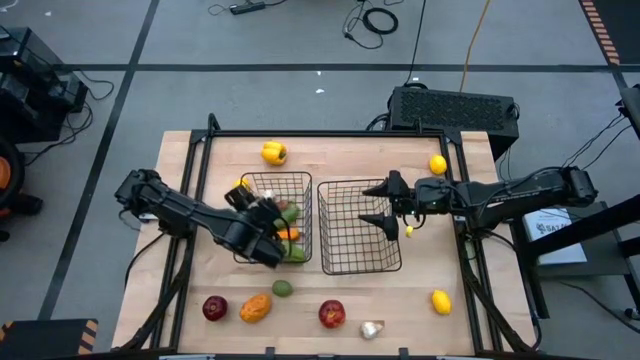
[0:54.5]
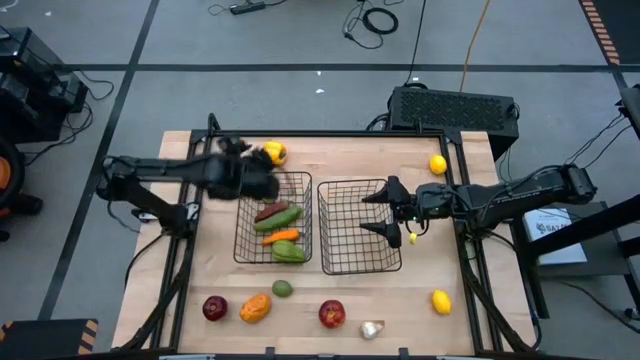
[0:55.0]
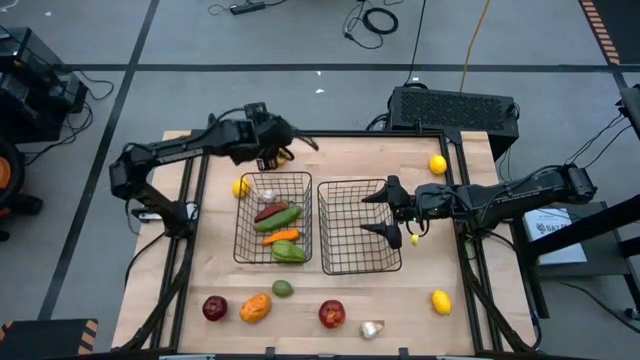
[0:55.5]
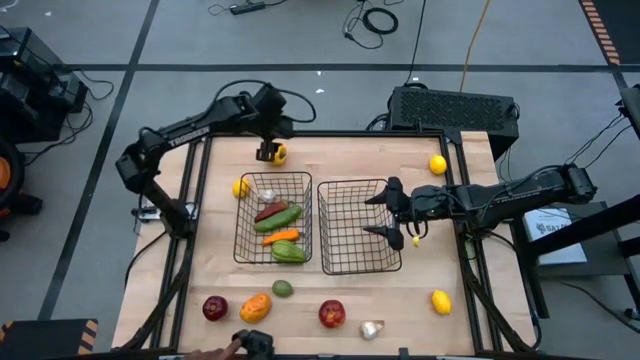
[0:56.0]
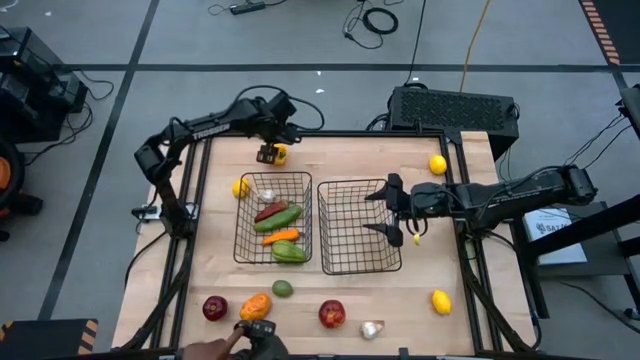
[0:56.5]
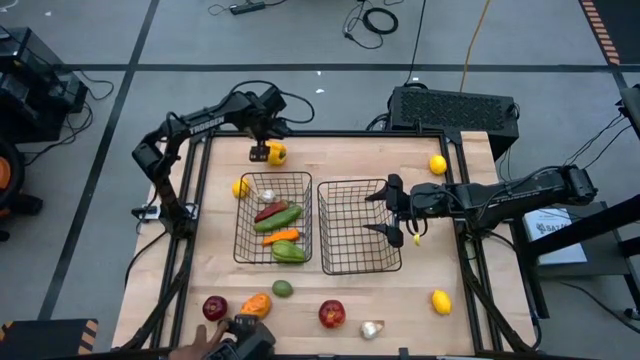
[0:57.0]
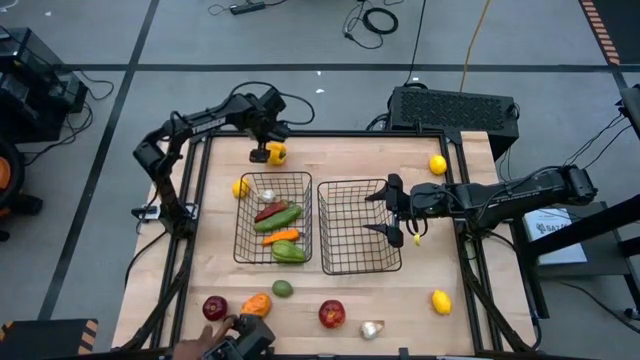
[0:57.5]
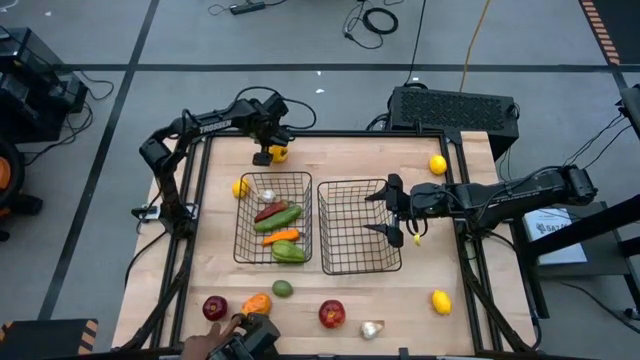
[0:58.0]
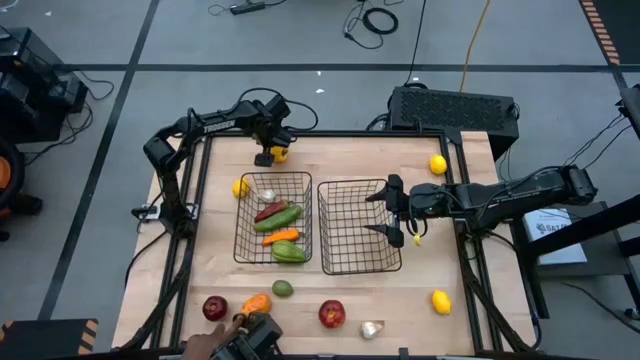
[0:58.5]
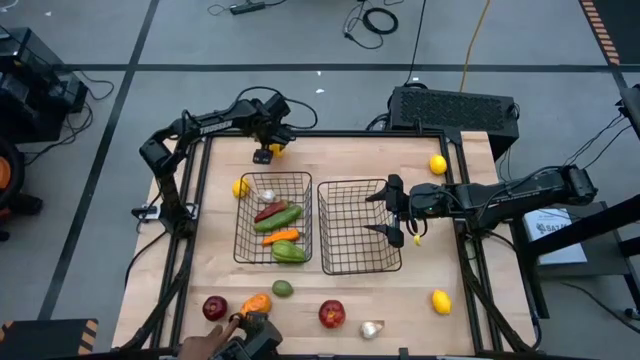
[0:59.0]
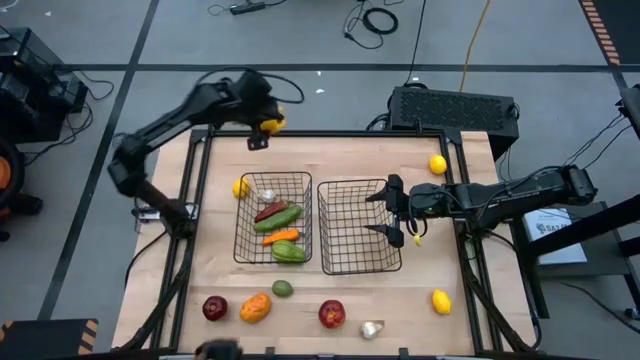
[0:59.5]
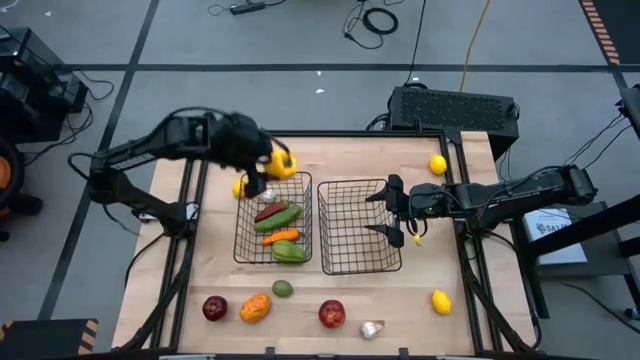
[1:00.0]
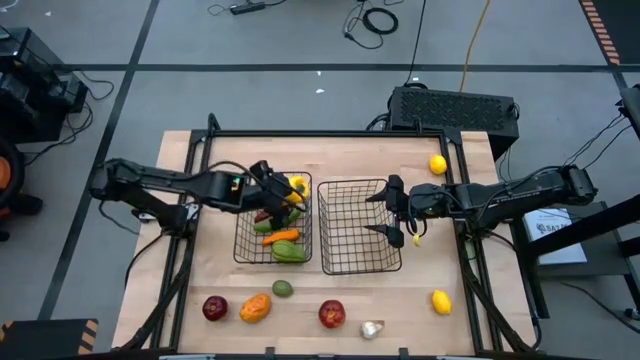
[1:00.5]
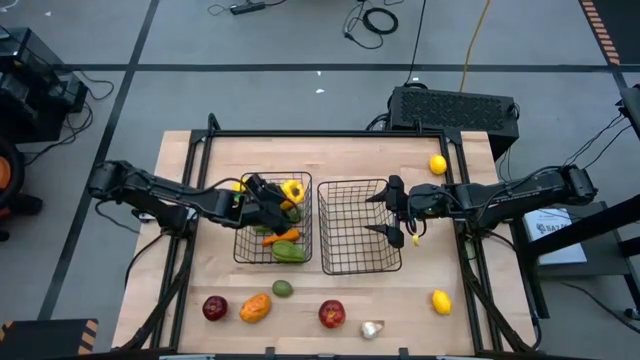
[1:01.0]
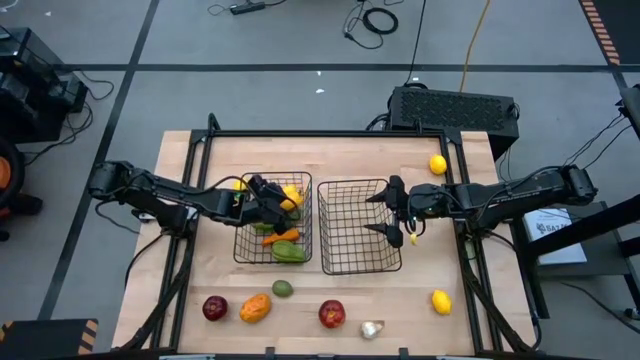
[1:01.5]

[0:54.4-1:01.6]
Task: Sort produce into baskets
Put the yellow bell pepper into the left black wire basket

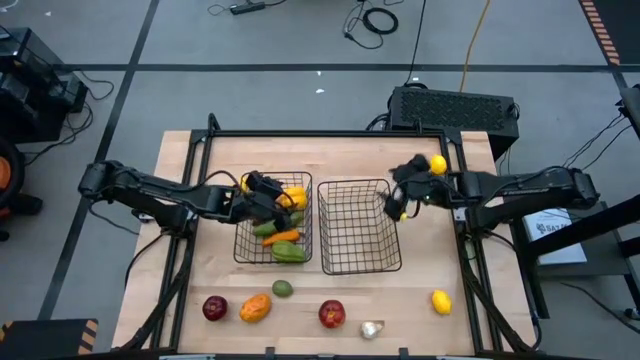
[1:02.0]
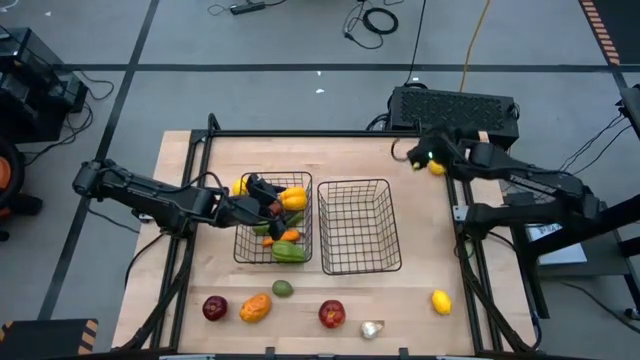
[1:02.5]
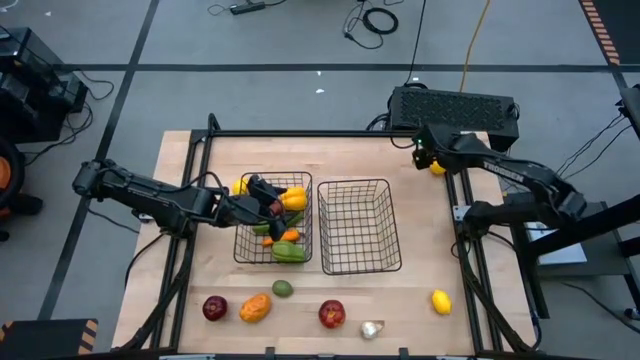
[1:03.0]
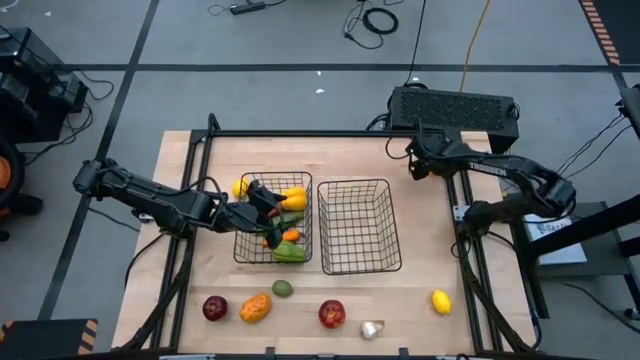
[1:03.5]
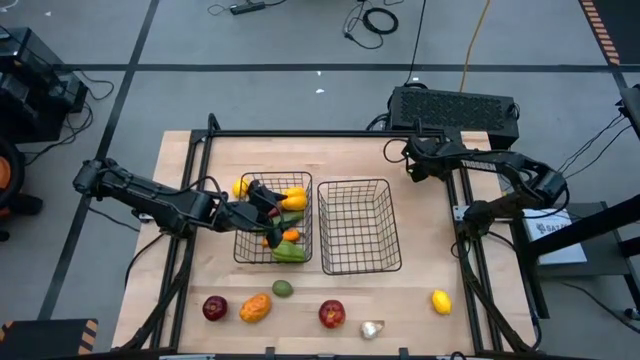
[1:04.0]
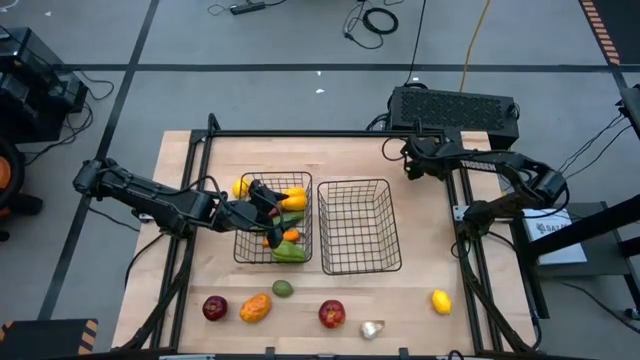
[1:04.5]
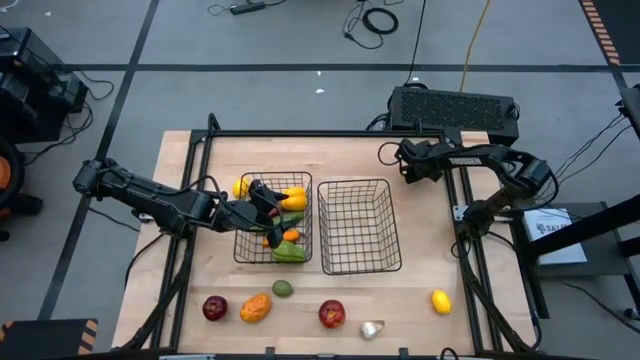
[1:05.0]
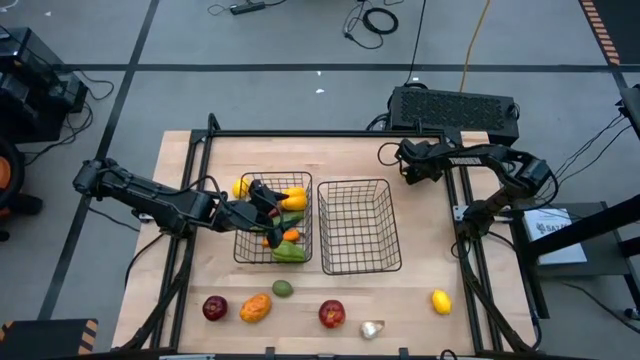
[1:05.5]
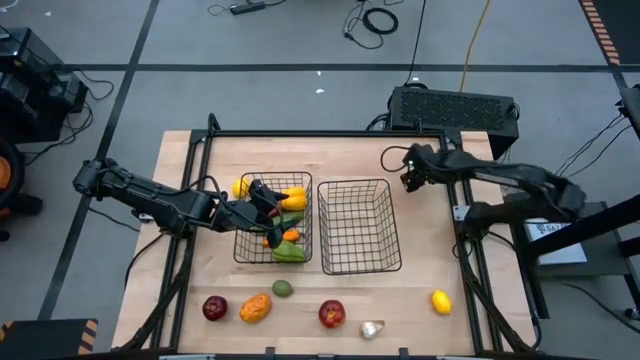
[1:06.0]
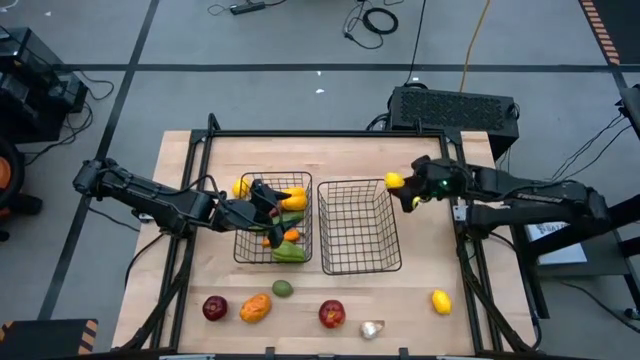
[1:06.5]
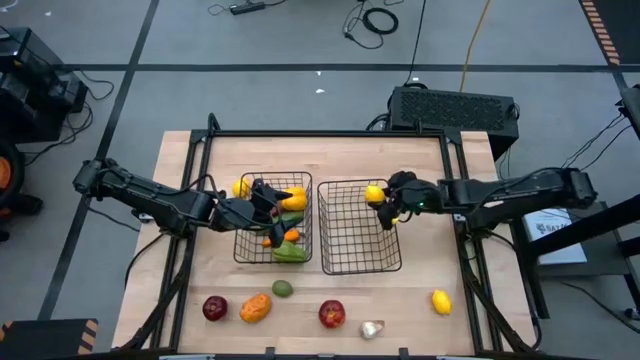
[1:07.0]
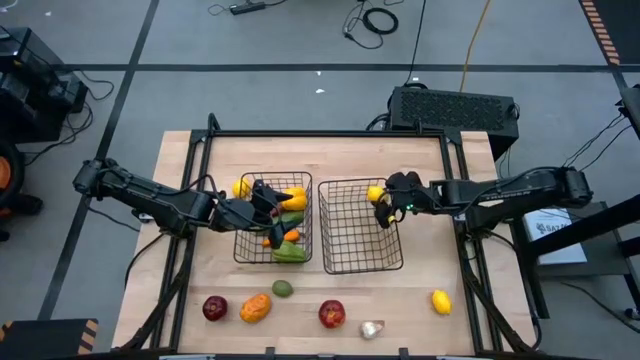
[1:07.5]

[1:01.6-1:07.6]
Put the top right yellow lemon into the right black wire basket

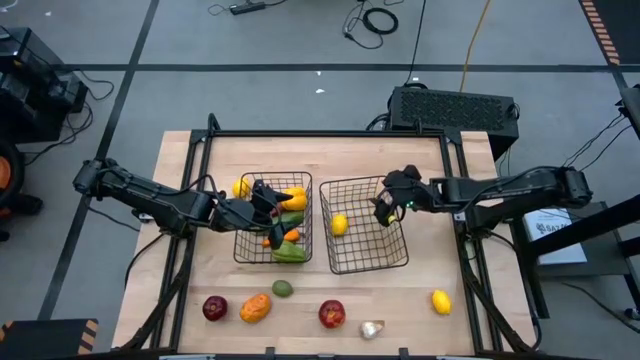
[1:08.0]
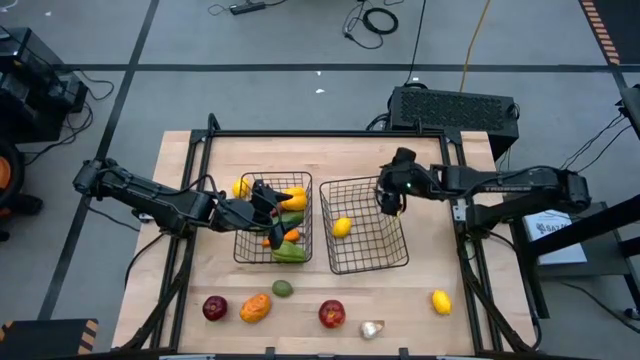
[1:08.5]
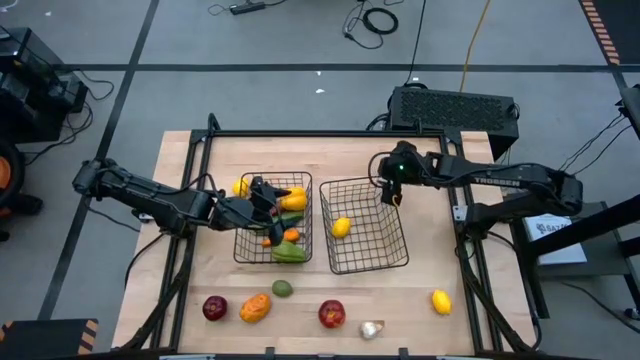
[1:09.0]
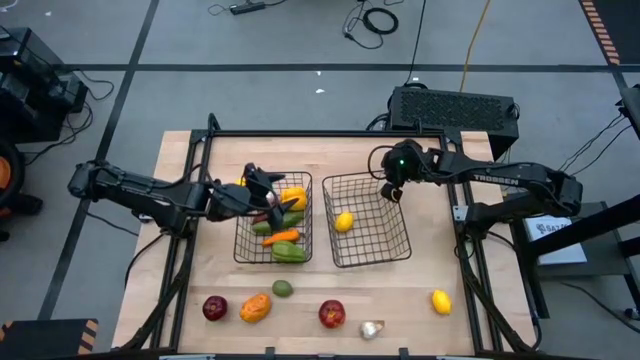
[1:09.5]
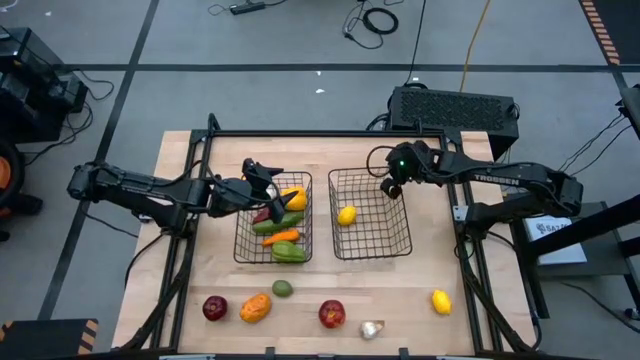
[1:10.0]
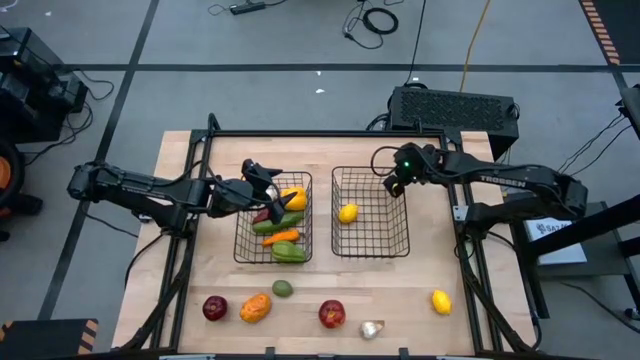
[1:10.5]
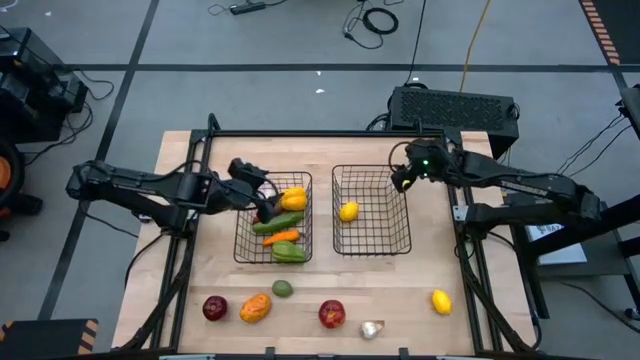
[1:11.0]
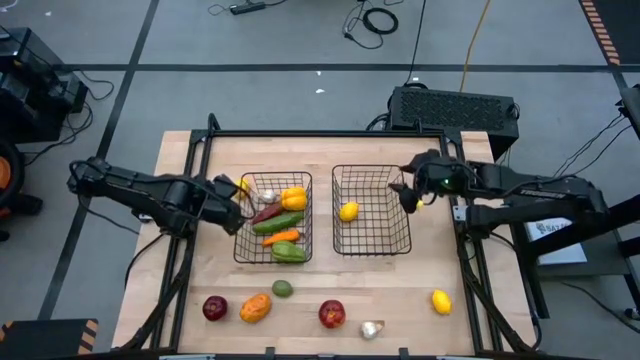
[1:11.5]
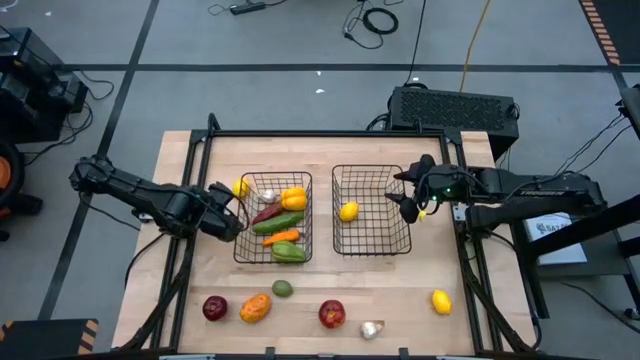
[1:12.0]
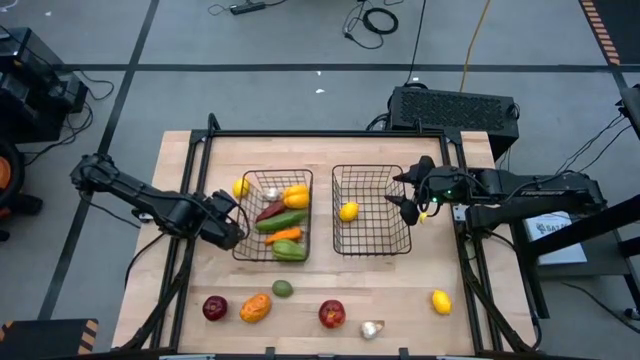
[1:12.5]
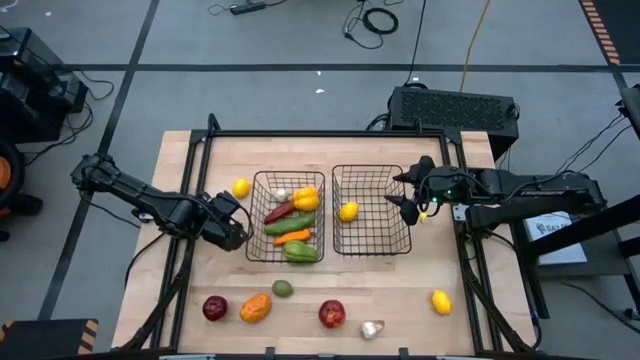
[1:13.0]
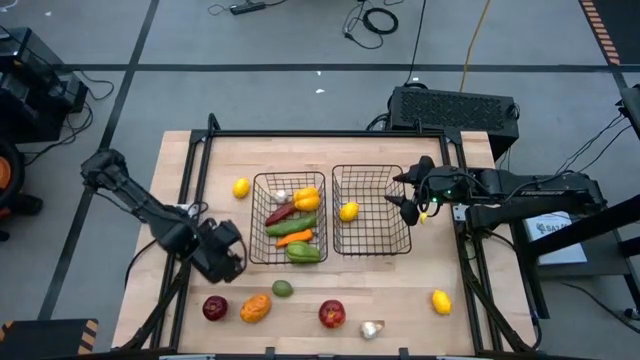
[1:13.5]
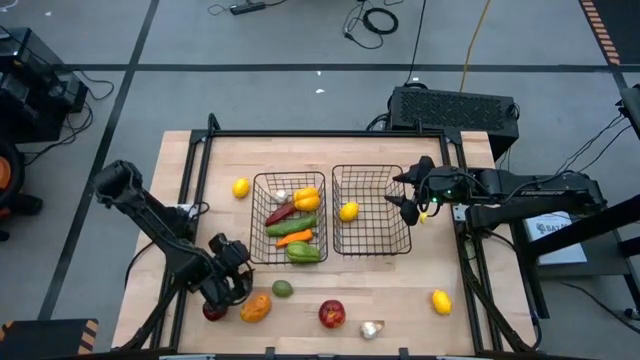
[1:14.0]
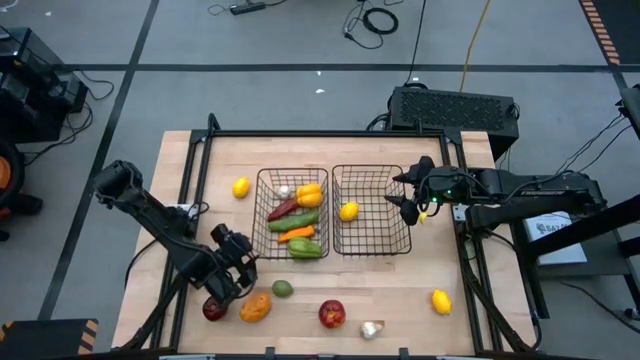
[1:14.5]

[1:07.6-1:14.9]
Adjust the black wire baskets
